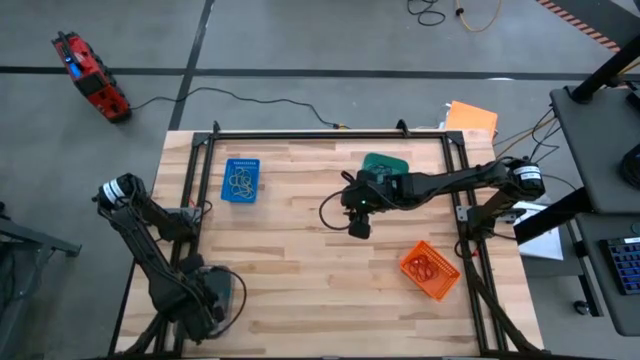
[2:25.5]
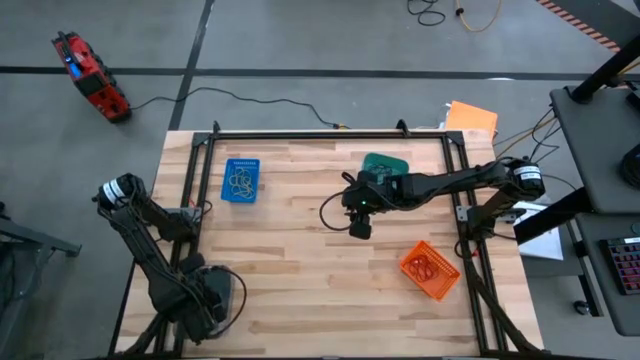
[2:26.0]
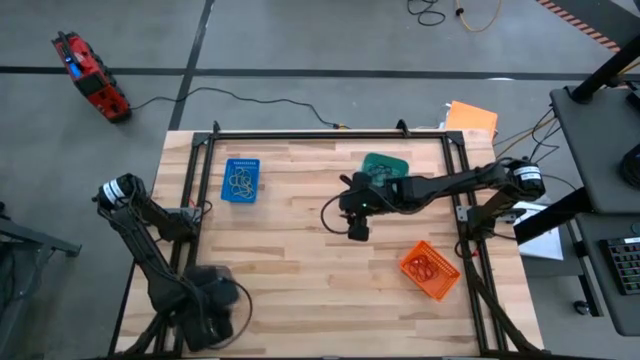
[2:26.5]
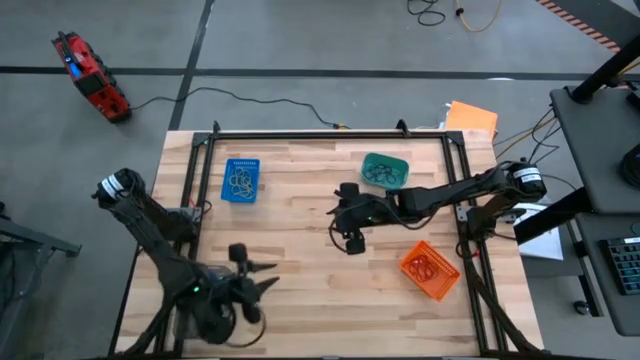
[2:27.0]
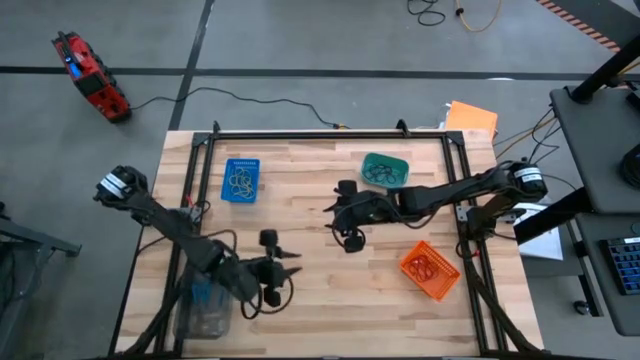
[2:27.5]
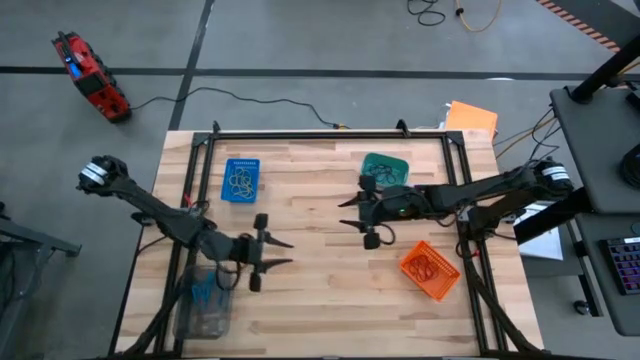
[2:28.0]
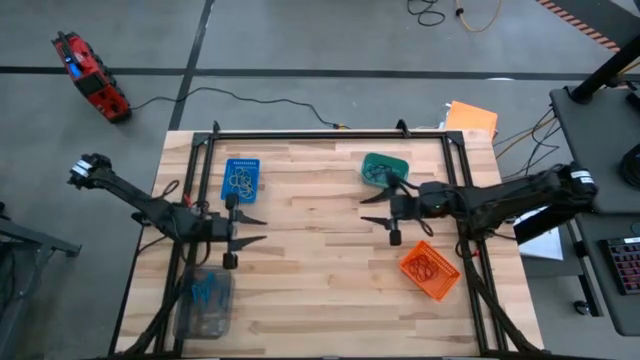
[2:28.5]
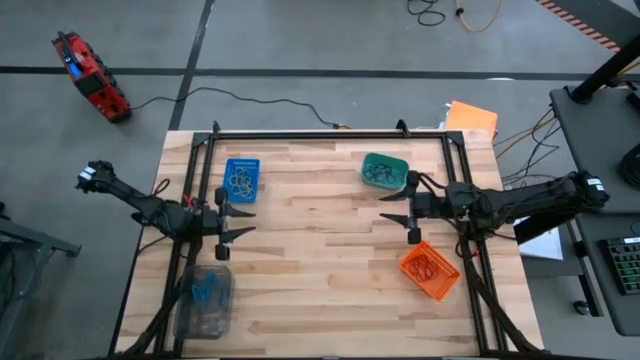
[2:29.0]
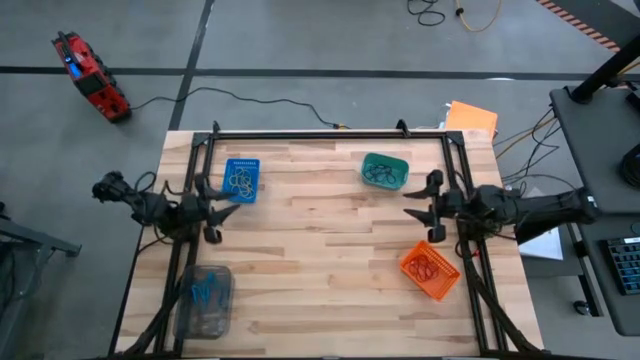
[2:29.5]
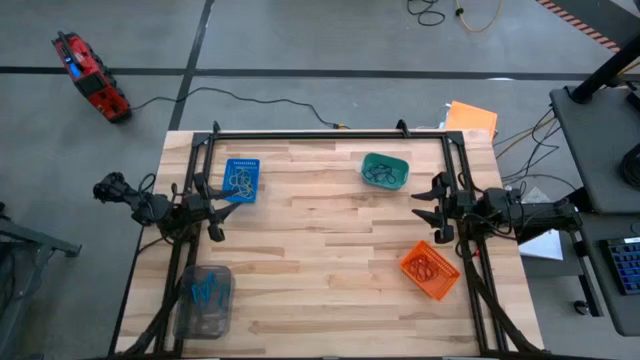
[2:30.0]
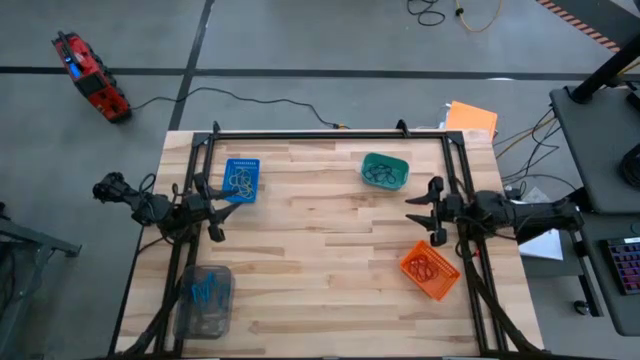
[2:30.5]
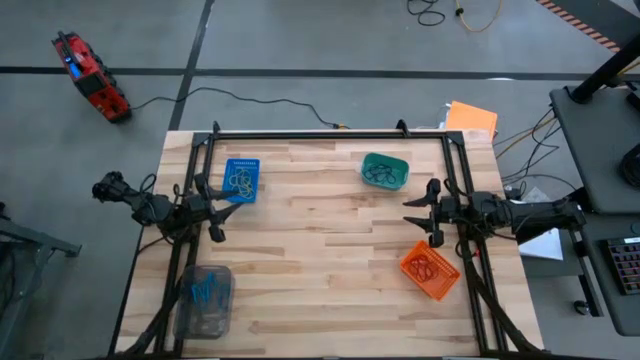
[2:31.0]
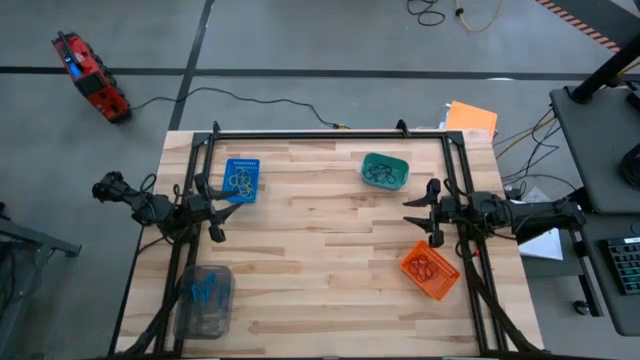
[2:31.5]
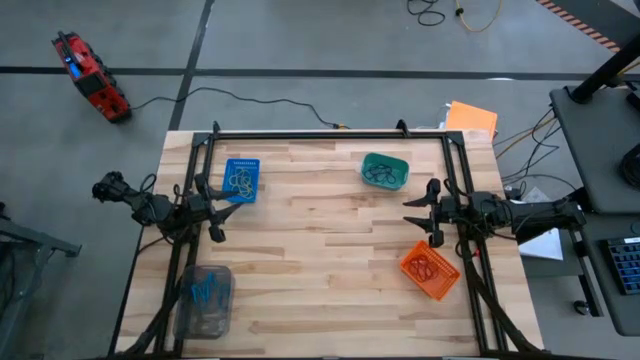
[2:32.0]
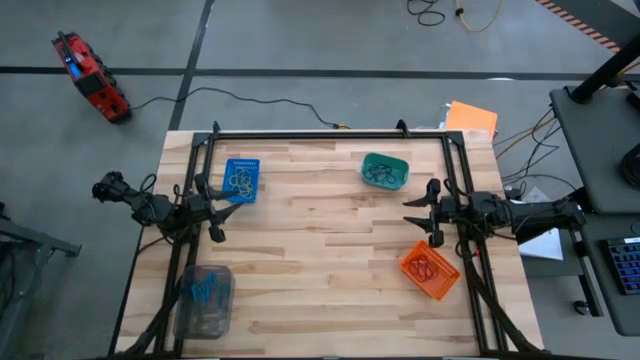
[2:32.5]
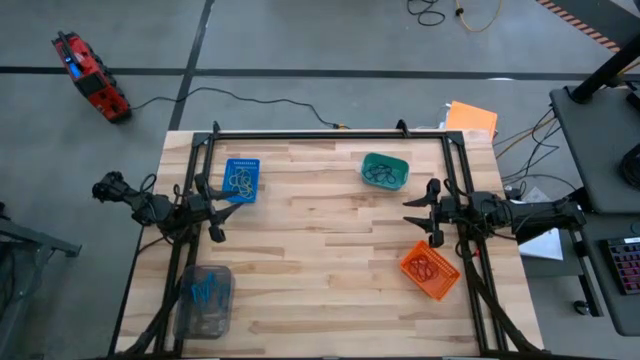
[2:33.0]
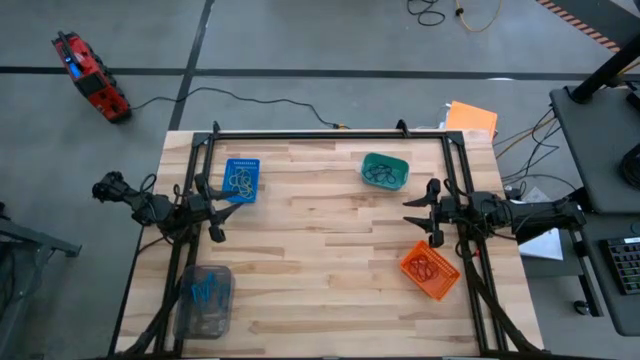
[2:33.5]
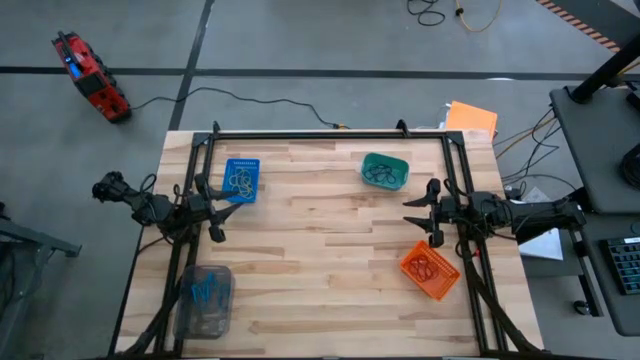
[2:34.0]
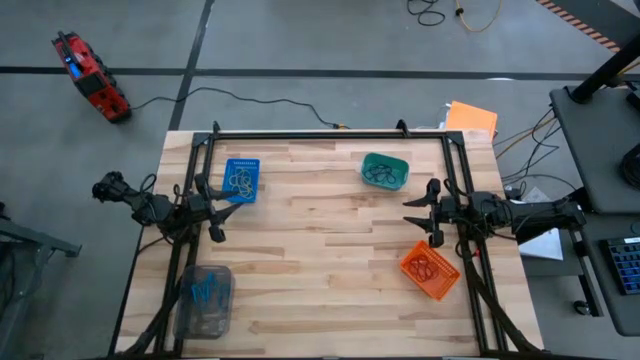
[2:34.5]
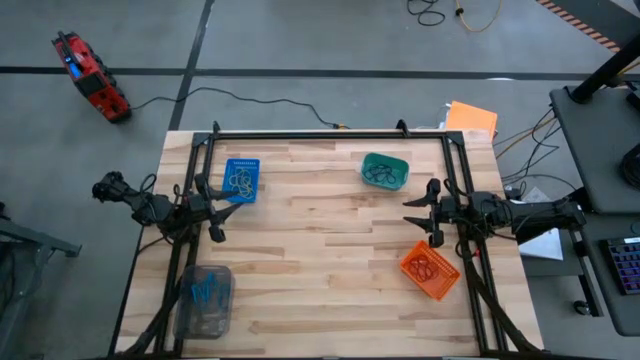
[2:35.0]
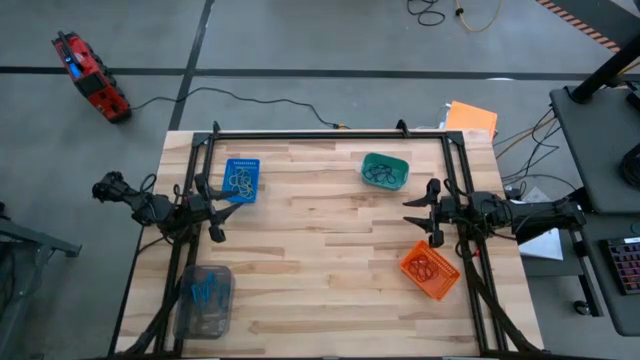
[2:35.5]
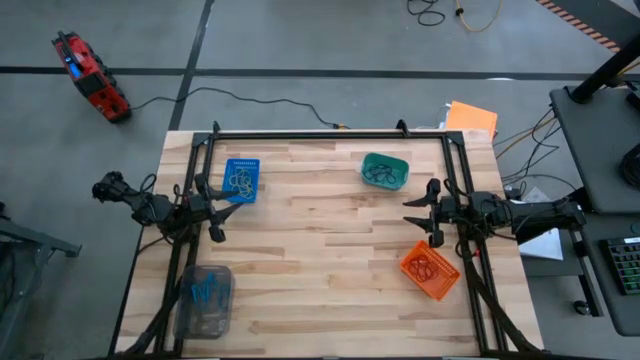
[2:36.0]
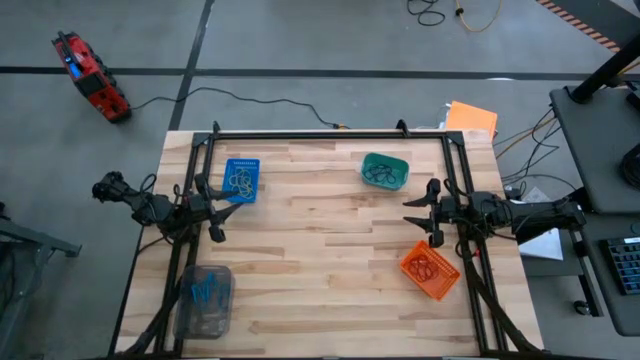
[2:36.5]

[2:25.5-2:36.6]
Task: Sort rubber bands into baskets
Return to Home Position

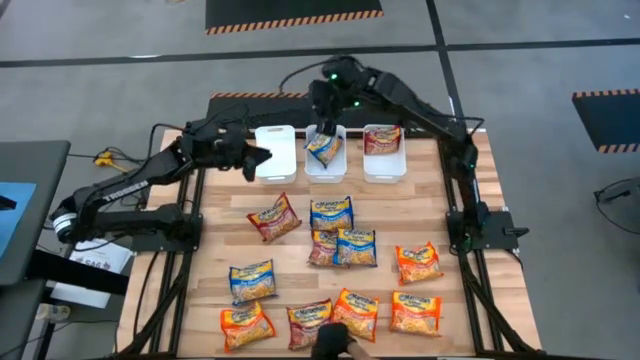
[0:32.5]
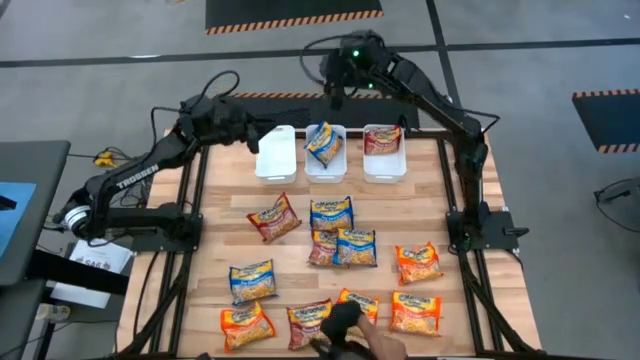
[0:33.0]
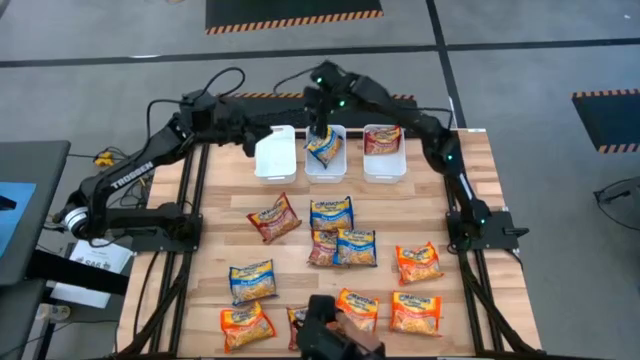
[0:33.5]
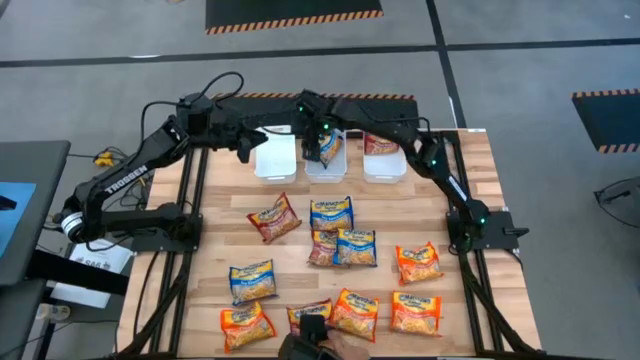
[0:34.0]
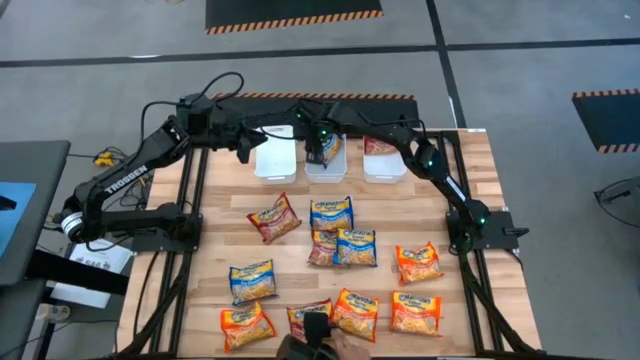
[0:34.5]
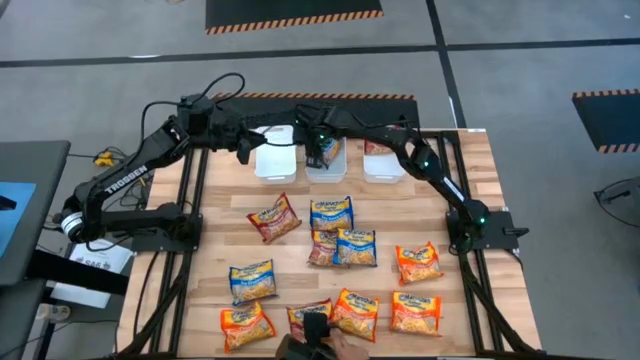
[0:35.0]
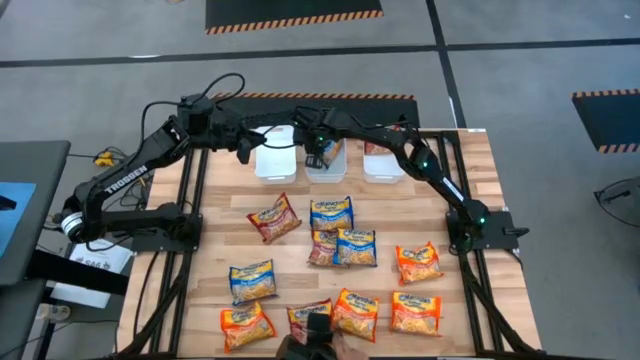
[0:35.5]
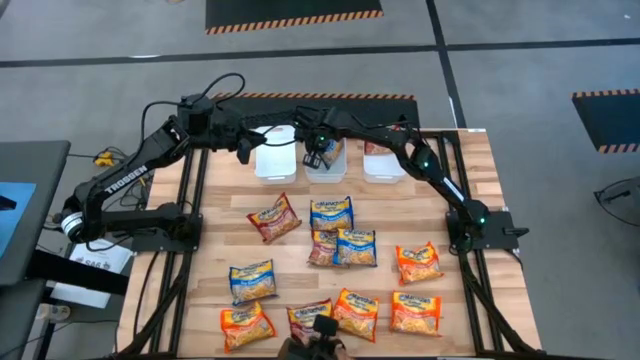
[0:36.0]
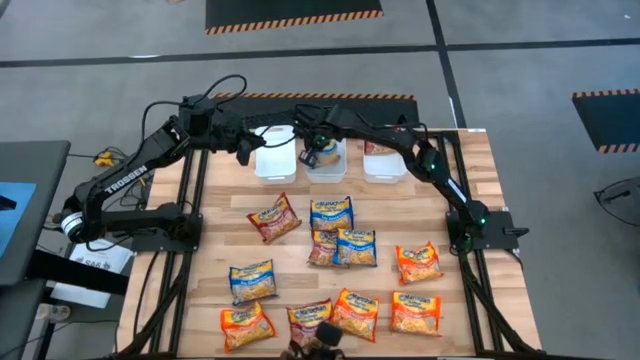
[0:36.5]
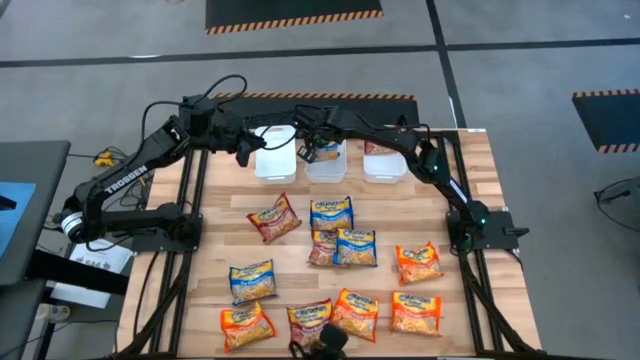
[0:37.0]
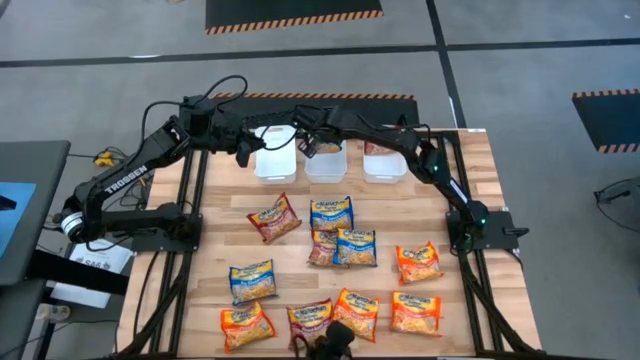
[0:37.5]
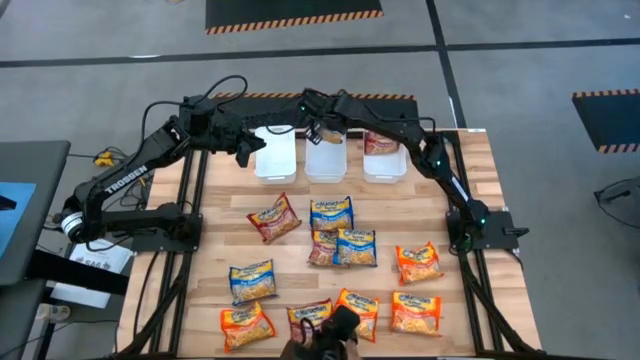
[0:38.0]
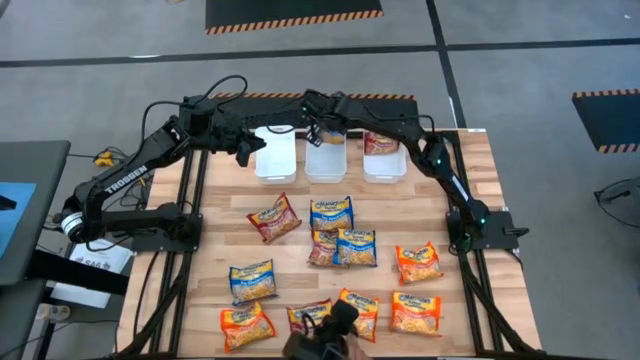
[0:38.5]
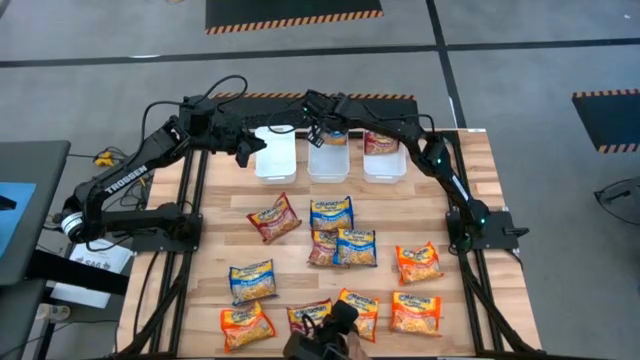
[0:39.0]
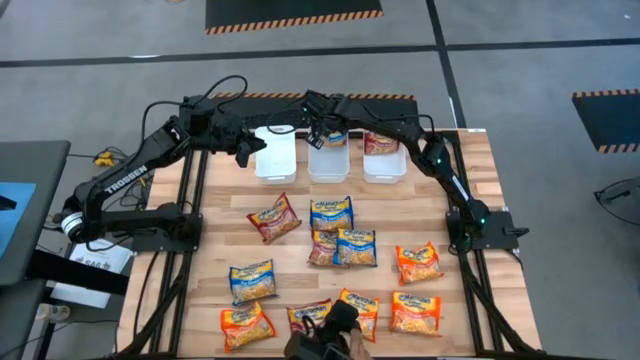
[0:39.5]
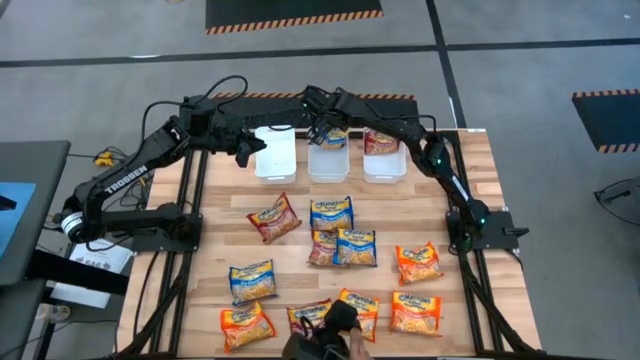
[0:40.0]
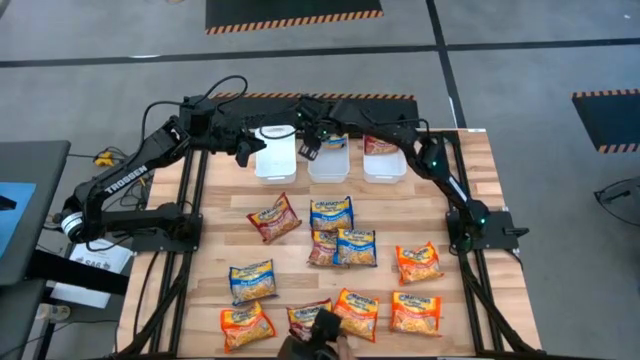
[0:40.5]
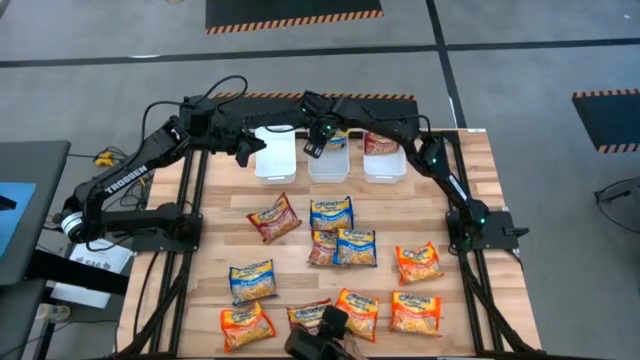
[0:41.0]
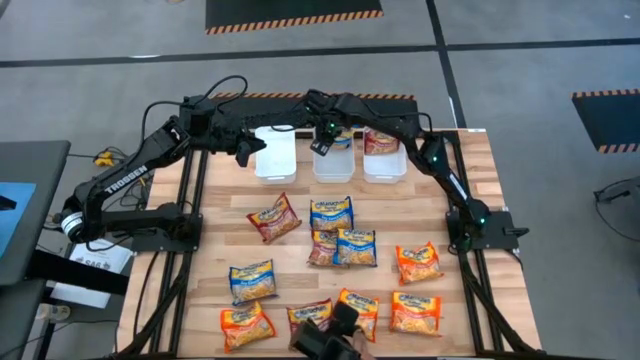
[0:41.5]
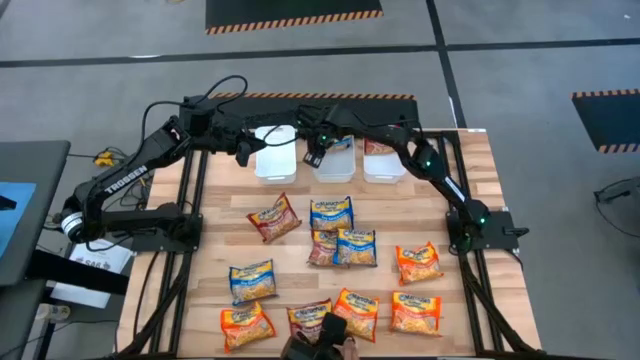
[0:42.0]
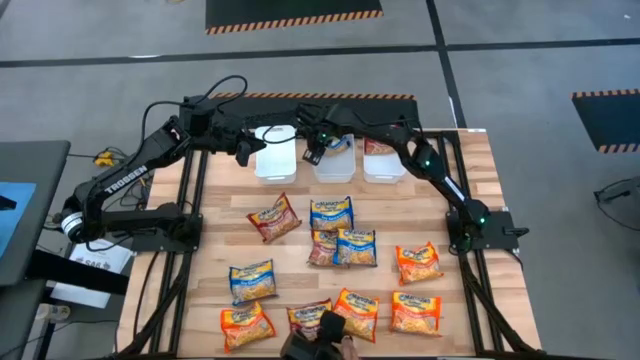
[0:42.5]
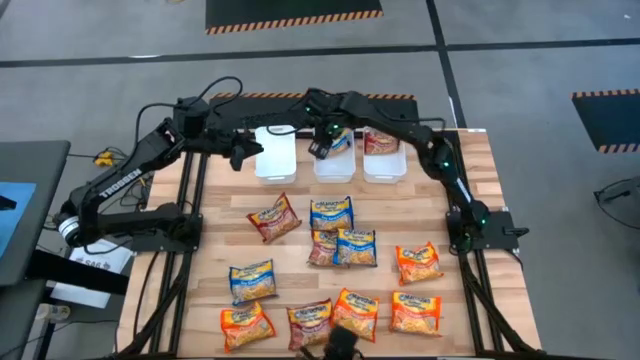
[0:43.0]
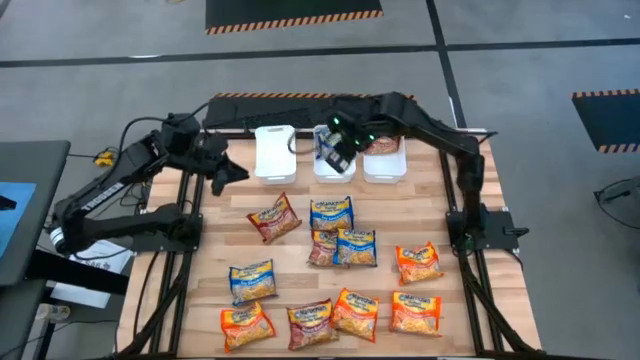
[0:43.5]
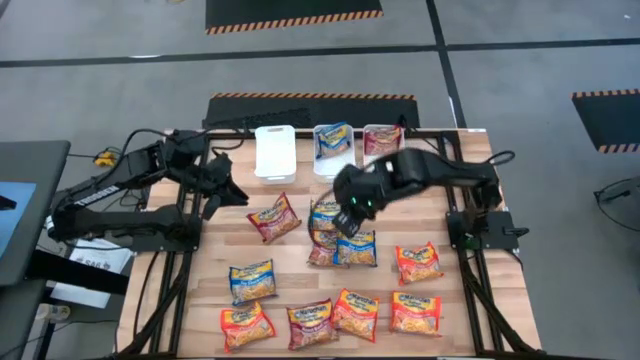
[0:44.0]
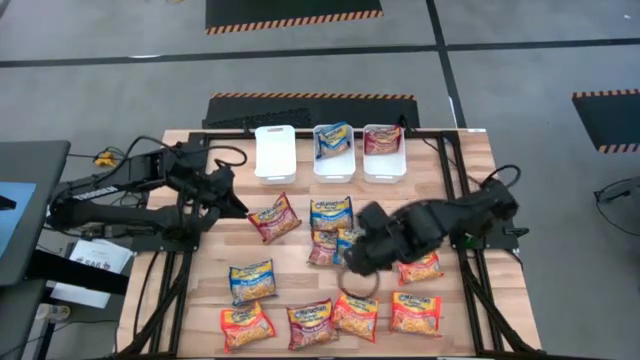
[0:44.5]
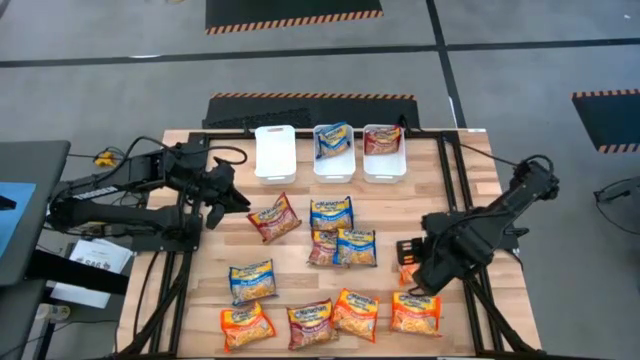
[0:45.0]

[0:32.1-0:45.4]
Task: Sort Maruchan noodles
Put the top left blue noodle soup pack into the middle white bin
